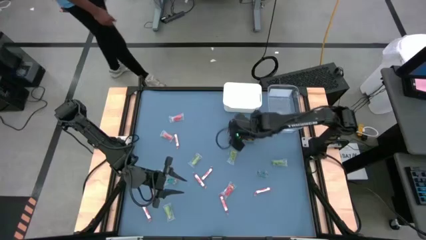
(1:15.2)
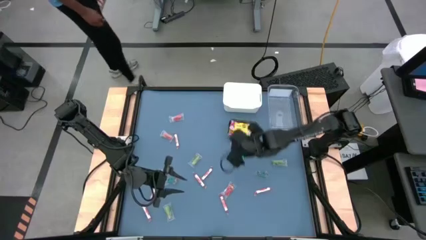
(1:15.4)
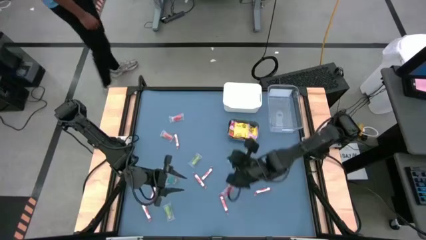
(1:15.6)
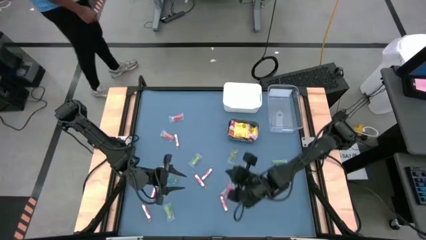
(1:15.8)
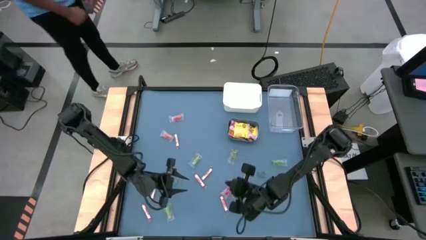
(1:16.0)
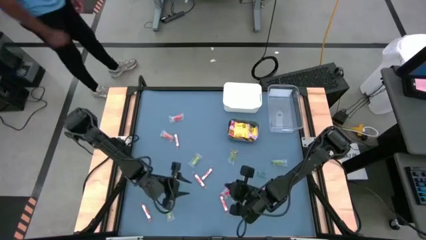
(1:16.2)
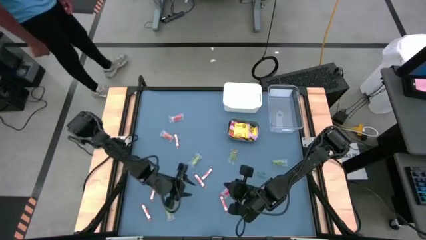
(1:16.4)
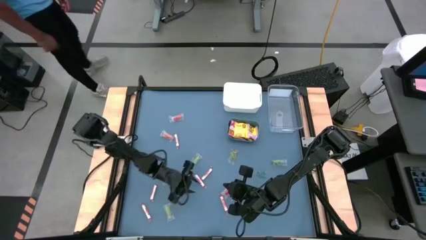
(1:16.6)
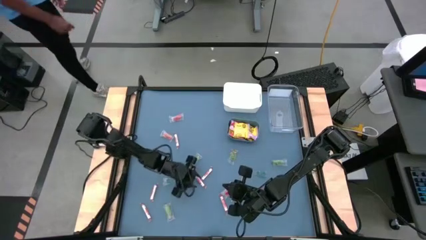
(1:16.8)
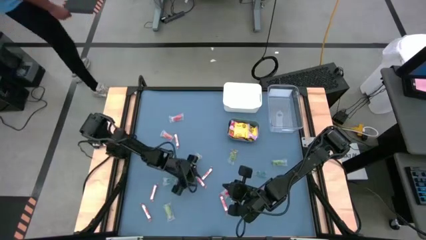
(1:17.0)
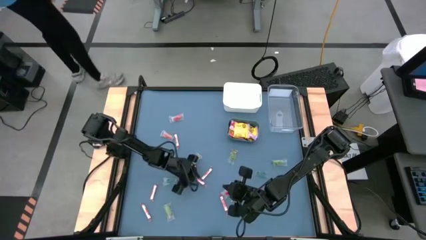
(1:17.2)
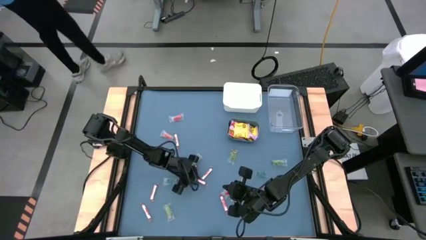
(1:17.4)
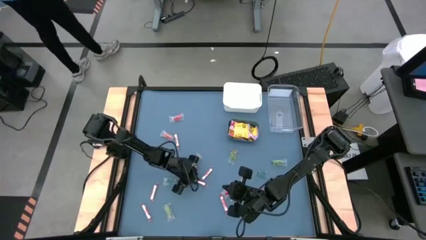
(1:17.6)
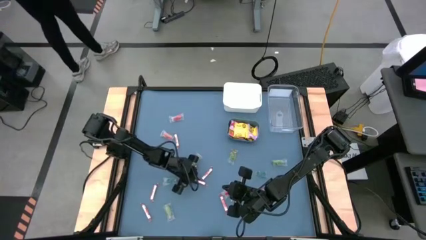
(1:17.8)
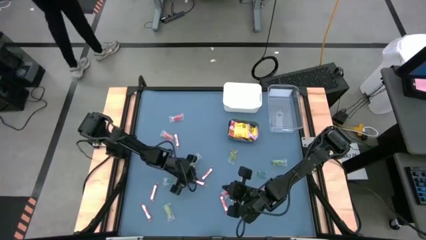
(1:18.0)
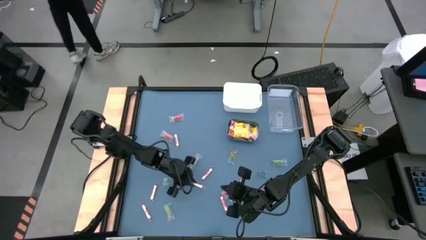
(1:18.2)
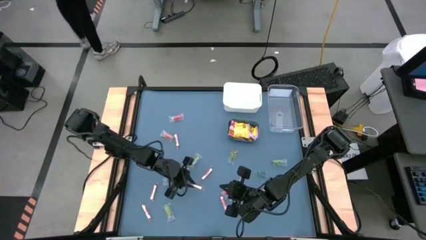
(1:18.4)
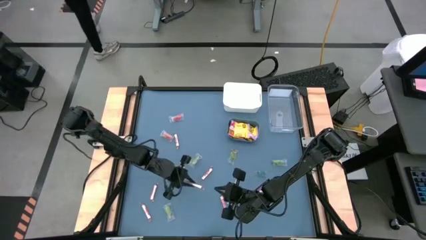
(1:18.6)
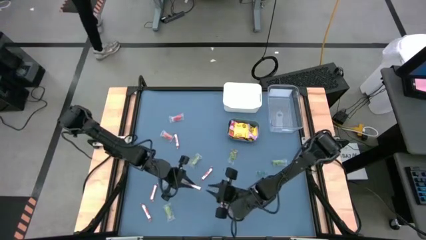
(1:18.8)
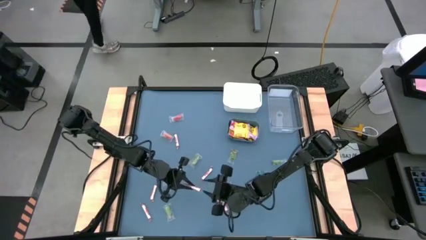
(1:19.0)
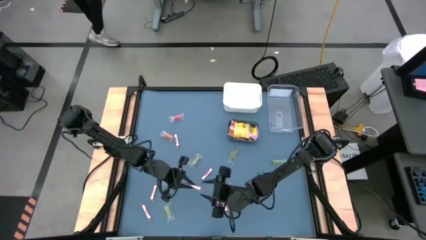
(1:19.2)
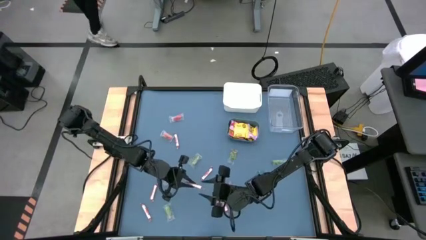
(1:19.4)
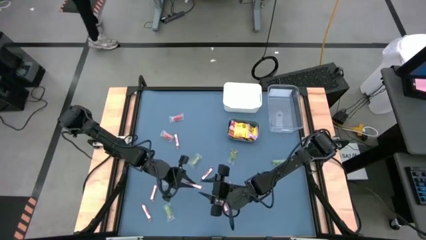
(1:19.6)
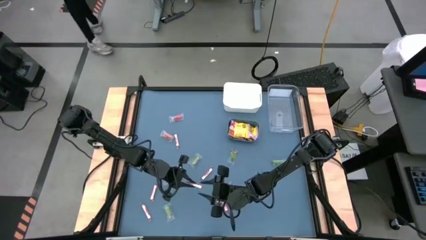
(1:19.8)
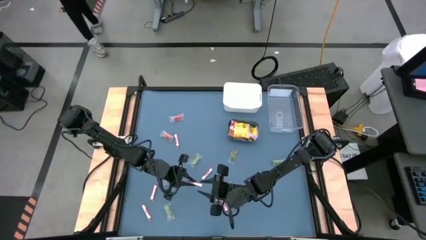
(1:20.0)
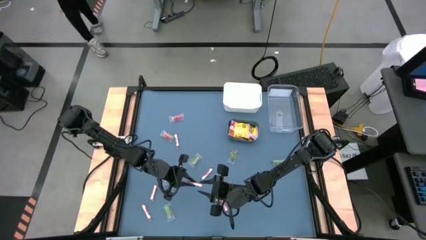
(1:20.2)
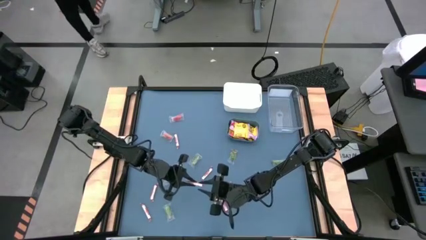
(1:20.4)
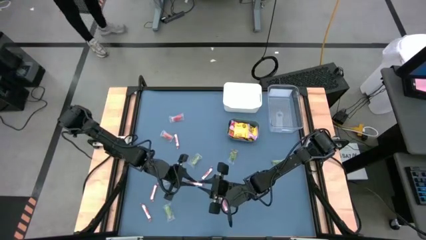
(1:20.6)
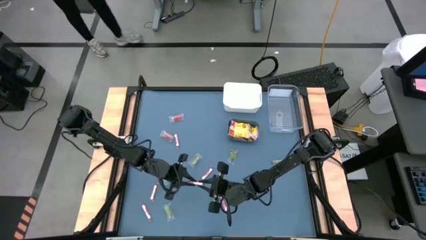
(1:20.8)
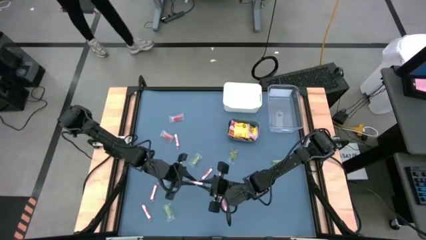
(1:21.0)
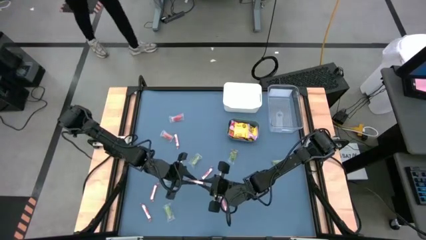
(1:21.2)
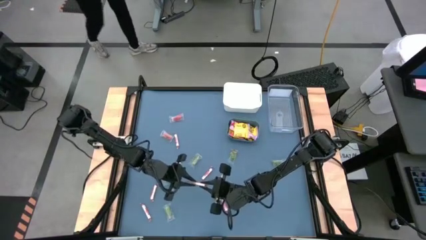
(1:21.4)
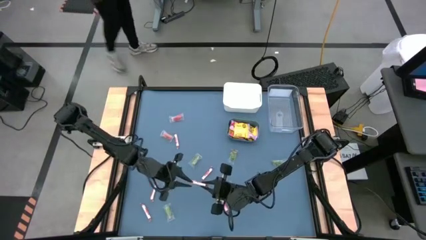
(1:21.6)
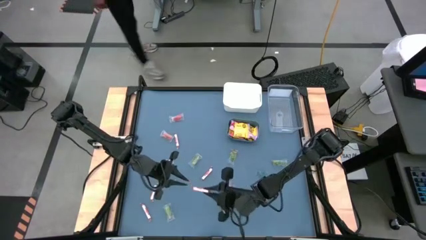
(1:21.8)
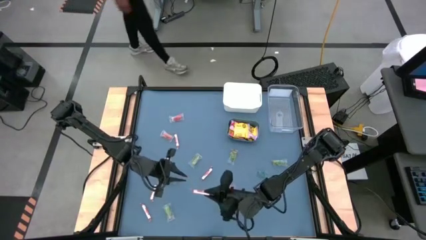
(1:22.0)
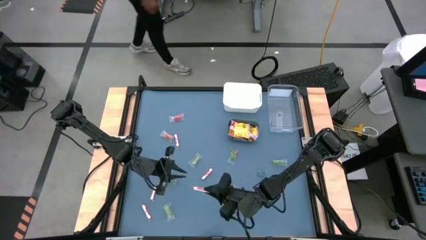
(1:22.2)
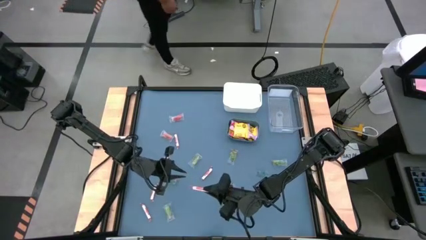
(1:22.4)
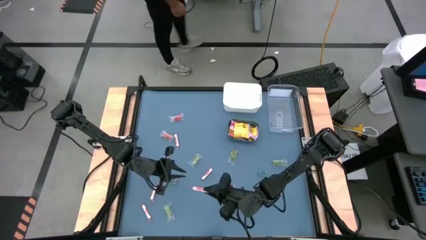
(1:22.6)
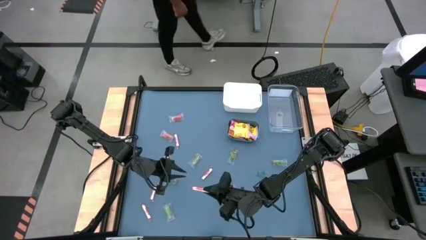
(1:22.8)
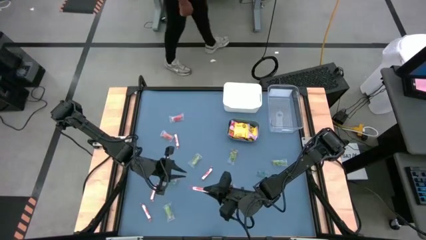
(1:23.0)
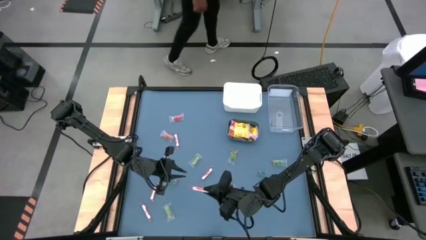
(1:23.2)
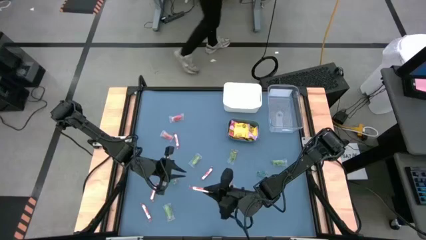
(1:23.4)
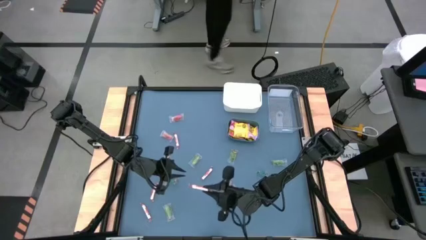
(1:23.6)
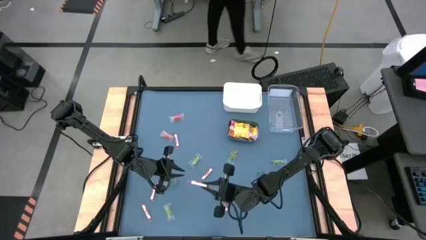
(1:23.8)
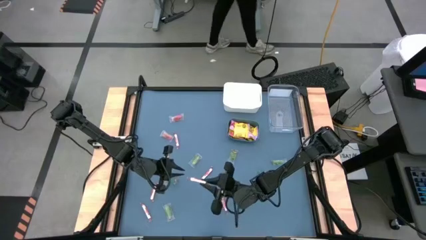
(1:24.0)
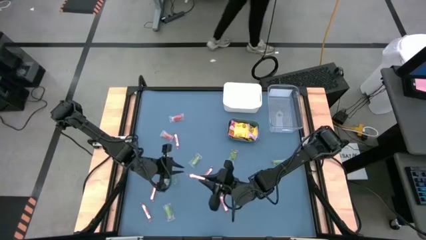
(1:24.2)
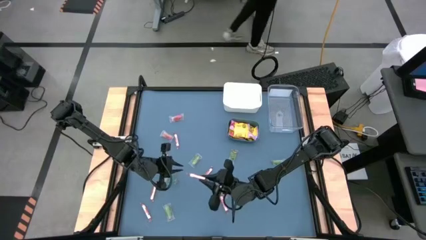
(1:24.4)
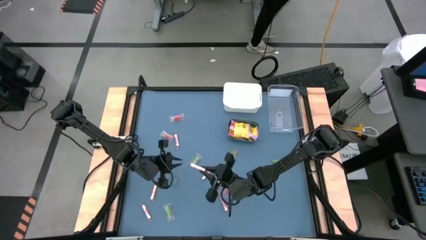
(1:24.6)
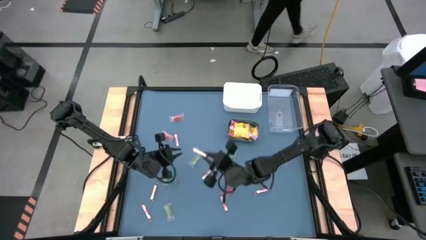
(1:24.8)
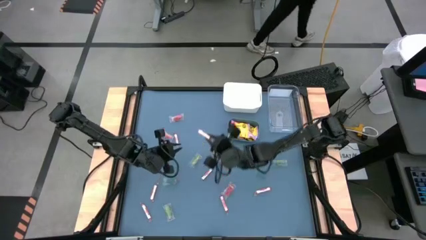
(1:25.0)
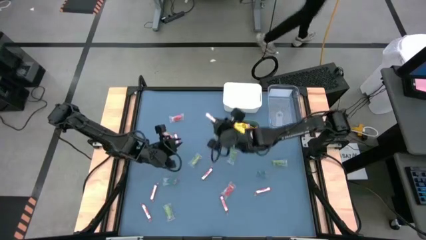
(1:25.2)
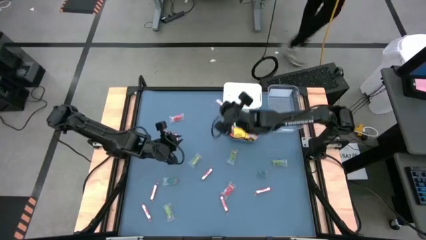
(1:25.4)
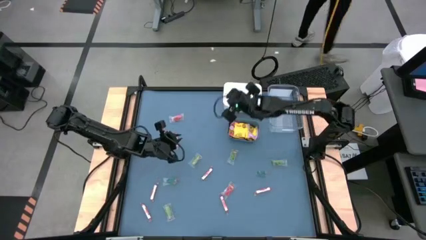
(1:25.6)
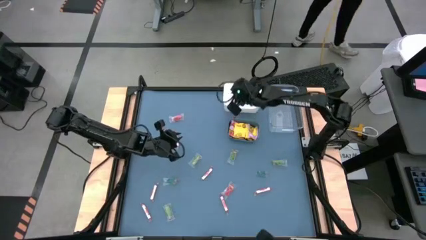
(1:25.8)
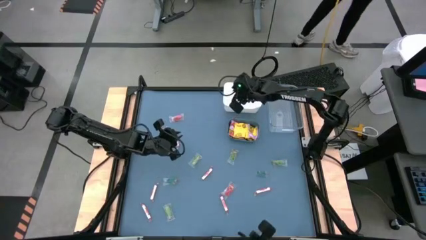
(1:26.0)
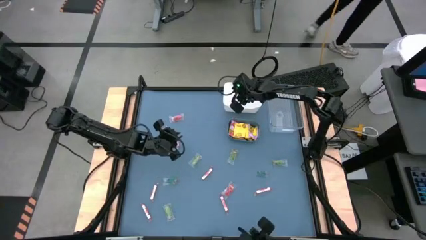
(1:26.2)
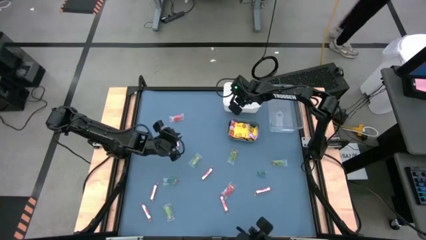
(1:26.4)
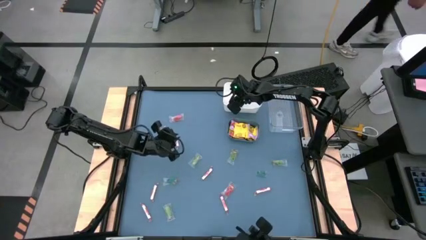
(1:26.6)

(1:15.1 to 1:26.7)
Task: Sort candy
Put the center white candy into the white bin

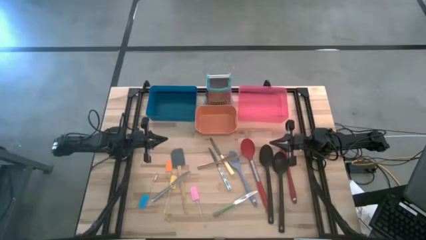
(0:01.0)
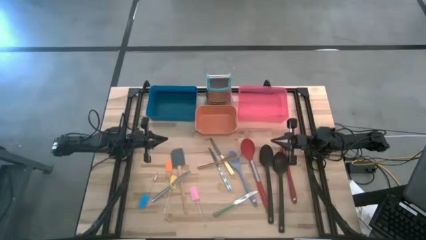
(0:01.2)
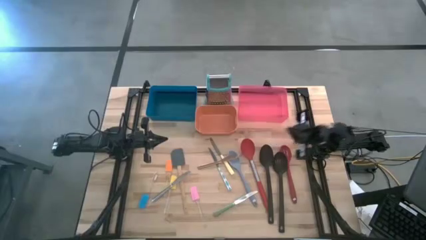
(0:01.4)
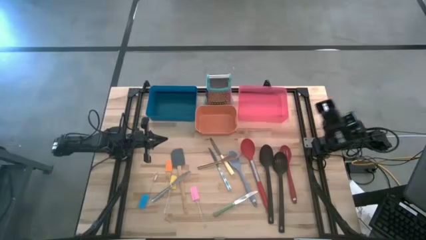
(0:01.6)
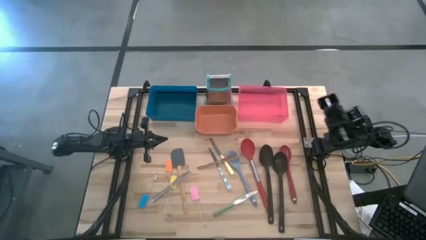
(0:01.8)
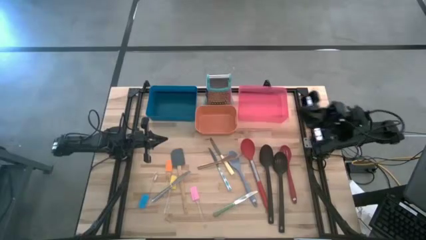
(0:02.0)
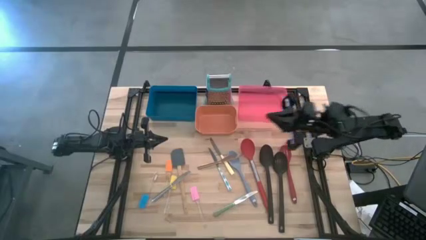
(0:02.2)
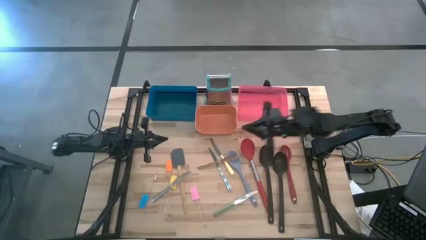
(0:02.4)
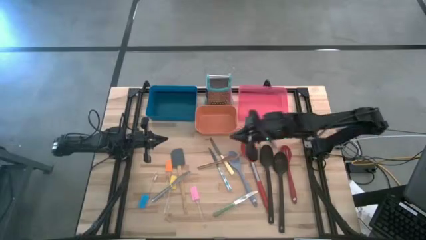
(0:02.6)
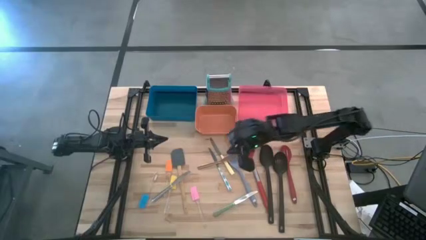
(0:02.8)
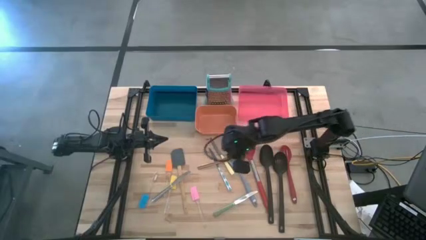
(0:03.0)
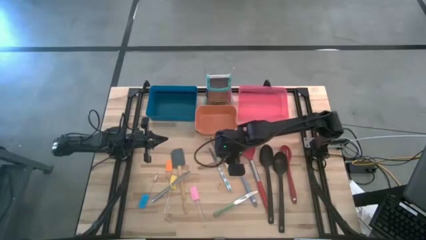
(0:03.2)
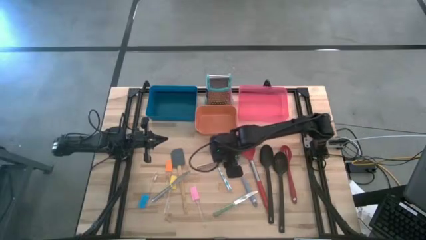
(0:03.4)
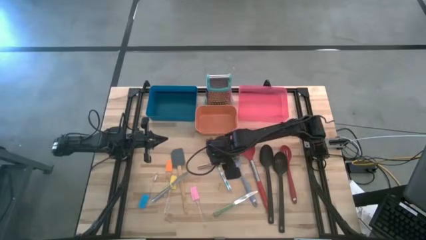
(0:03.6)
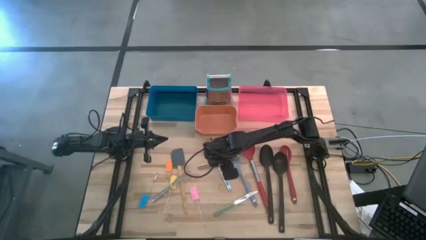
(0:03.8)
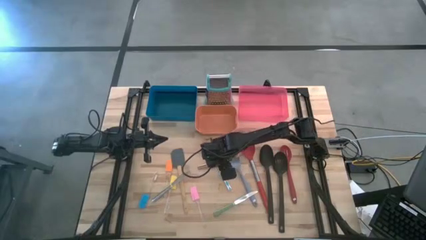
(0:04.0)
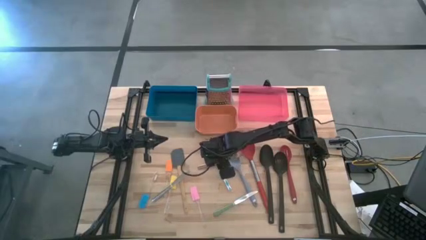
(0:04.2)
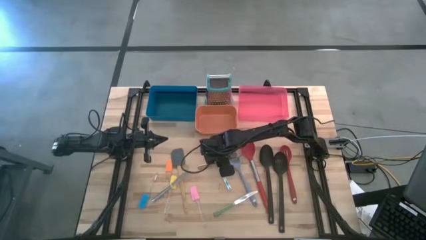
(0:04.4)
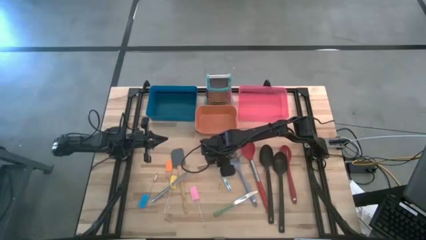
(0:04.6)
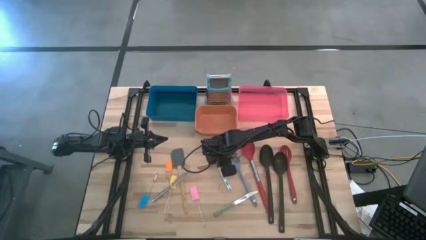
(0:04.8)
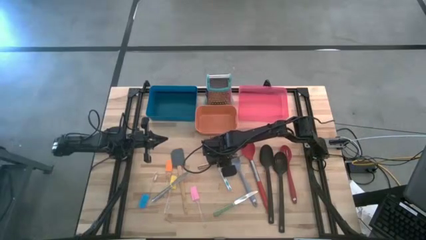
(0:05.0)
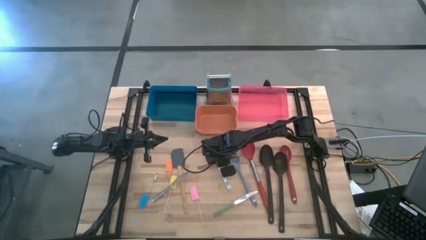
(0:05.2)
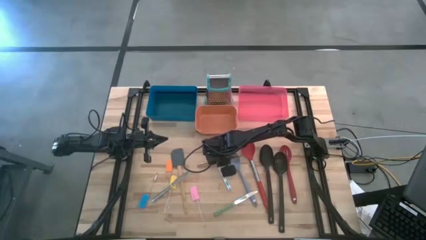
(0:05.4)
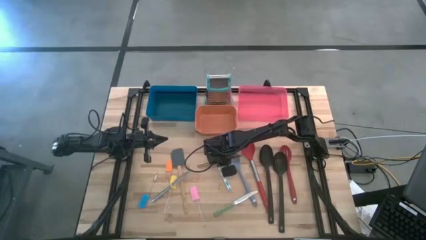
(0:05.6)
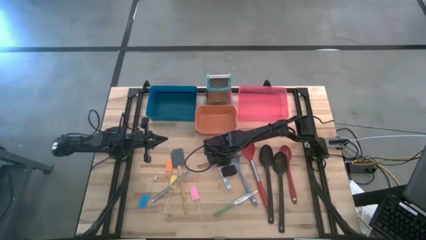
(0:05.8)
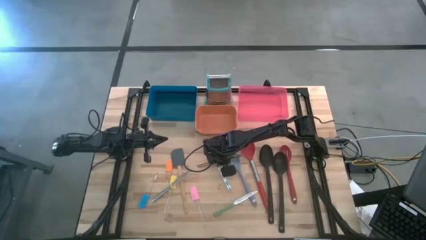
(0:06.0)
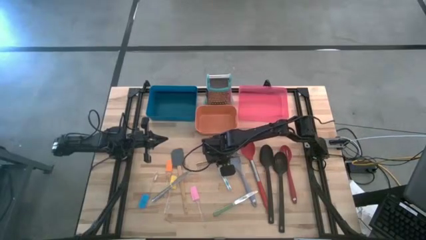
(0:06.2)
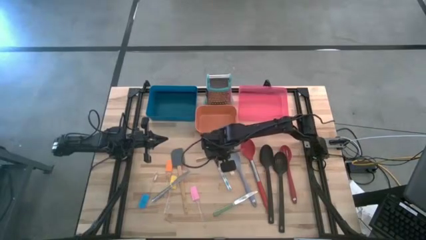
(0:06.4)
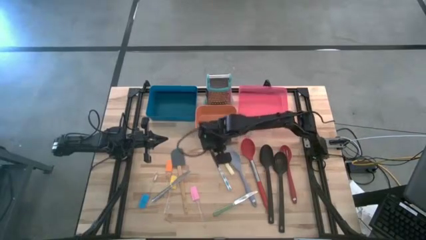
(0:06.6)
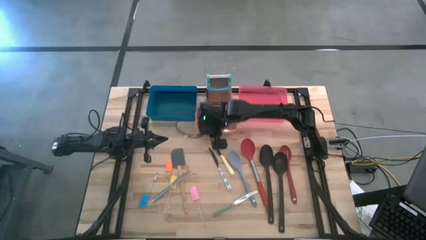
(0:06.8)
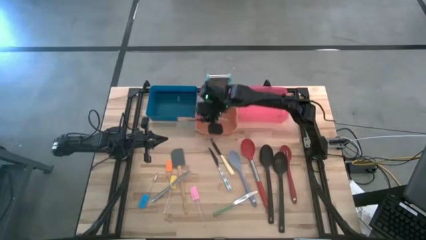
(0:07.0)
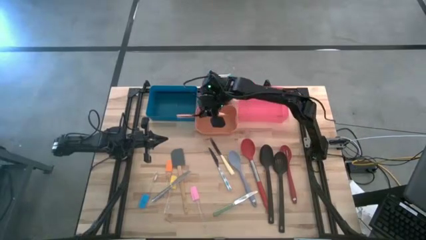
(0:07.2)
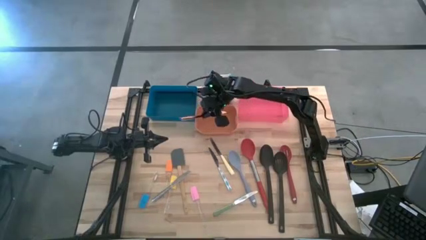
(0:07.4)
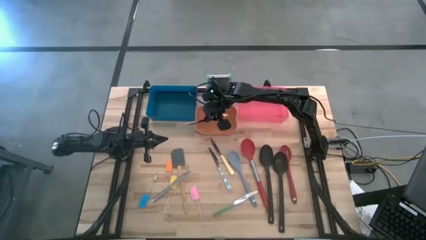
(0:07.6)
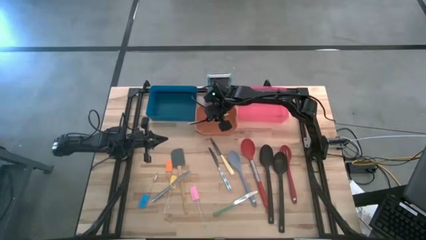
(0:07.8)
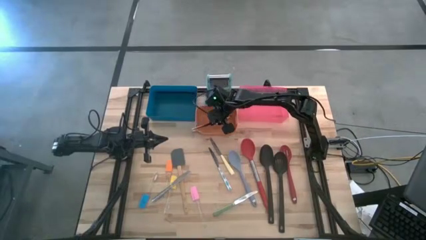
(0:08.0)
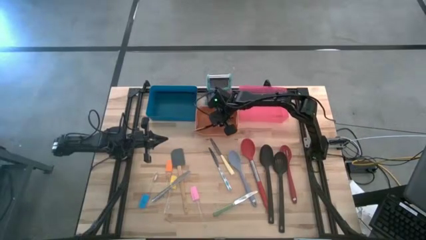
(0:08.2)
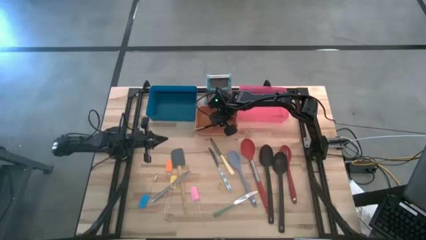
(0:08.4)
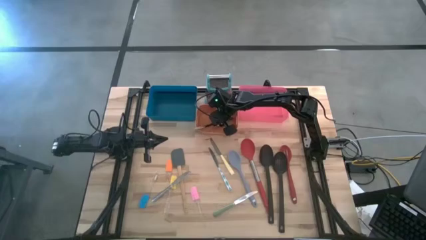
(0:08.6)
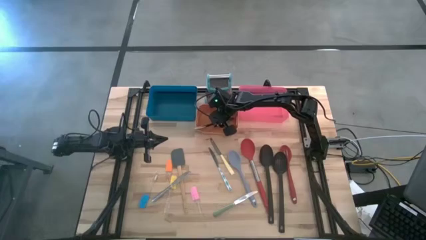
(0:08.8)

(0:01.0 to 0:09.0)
Task: Pick & Place Kitchen Items
Put the bronze table knife into the brown bin
